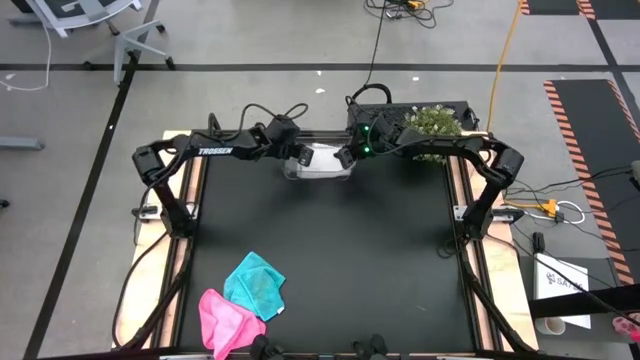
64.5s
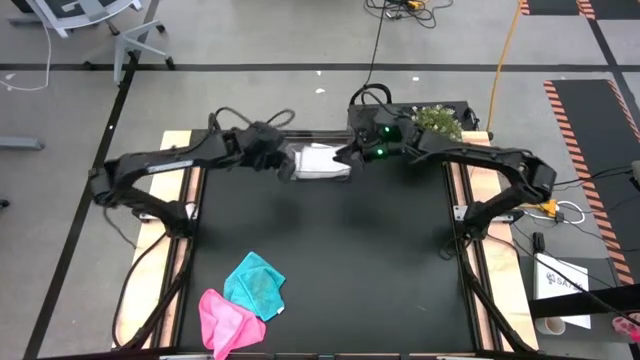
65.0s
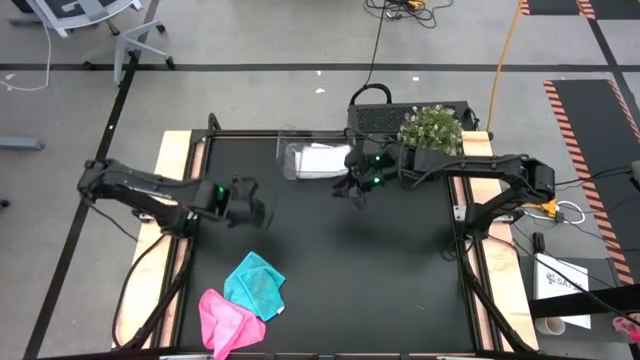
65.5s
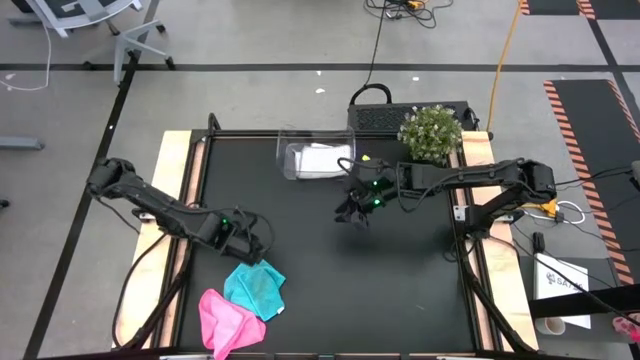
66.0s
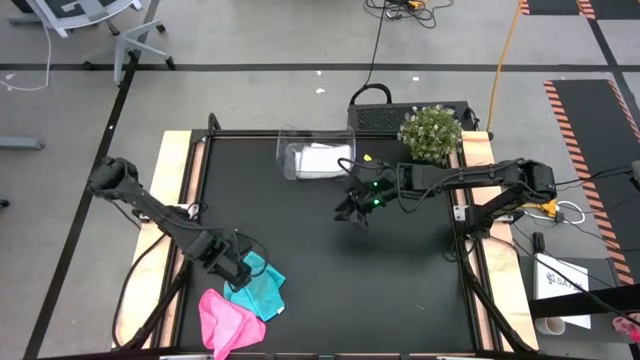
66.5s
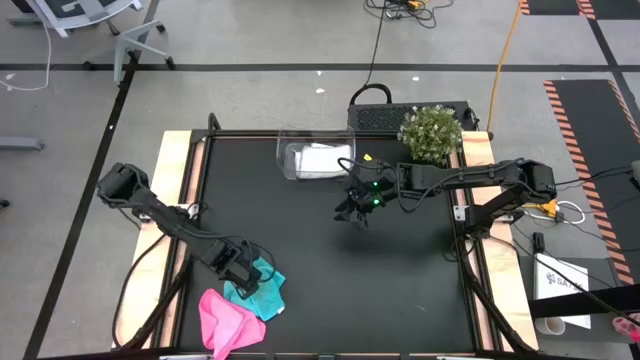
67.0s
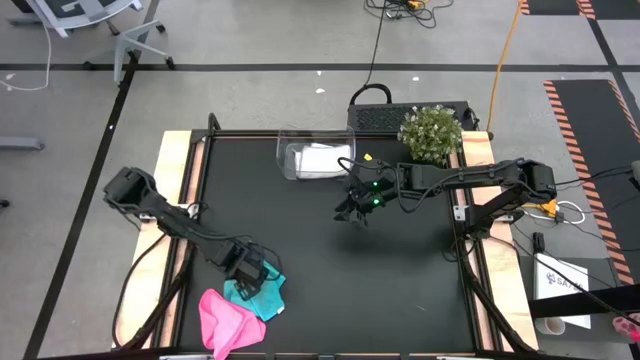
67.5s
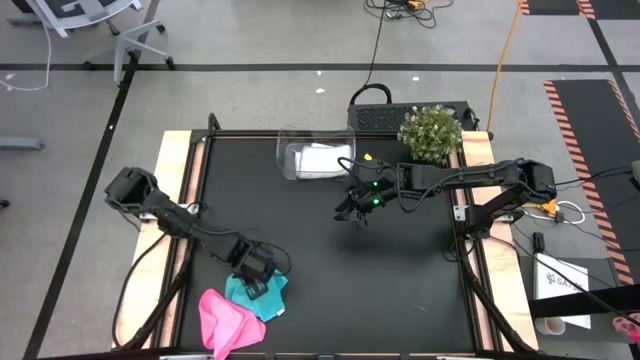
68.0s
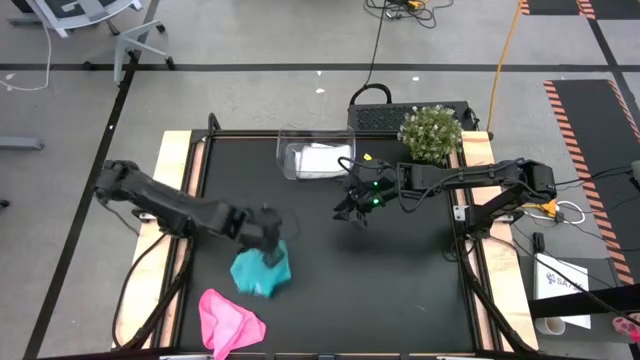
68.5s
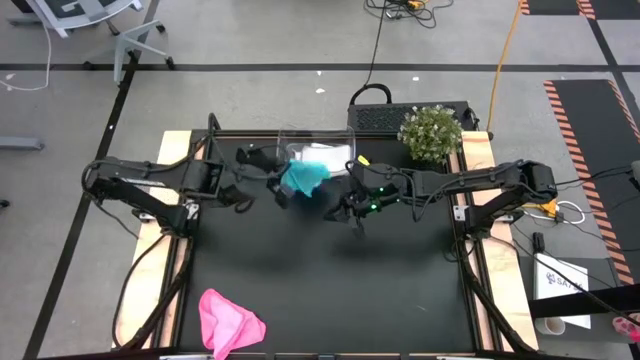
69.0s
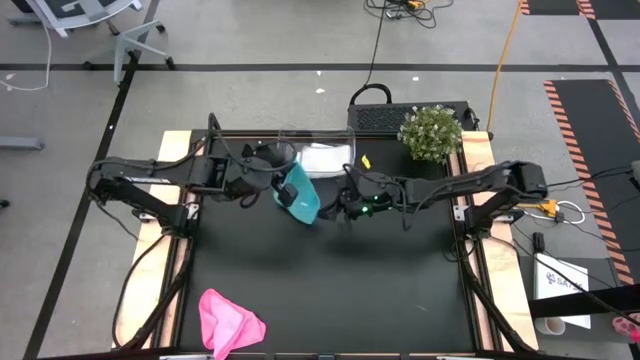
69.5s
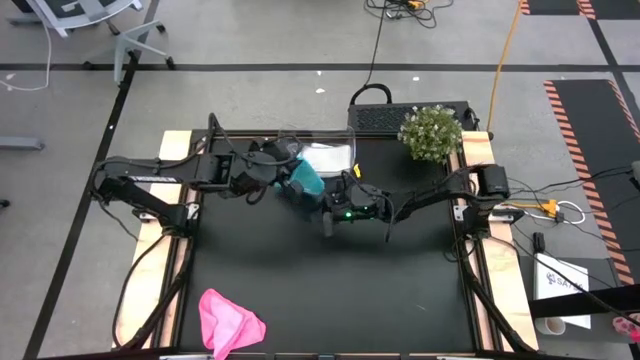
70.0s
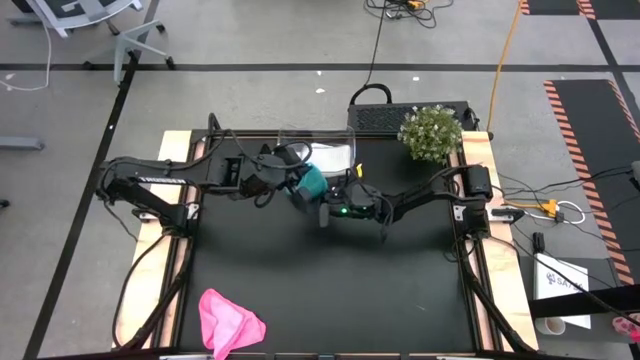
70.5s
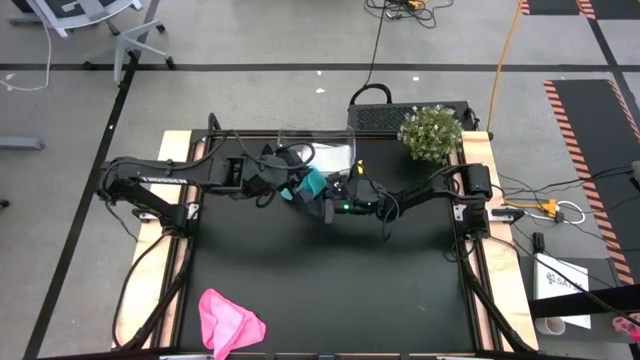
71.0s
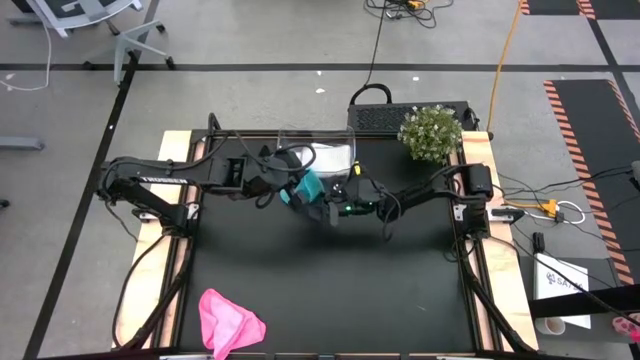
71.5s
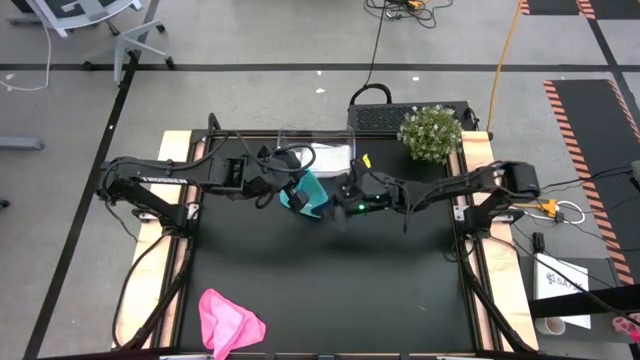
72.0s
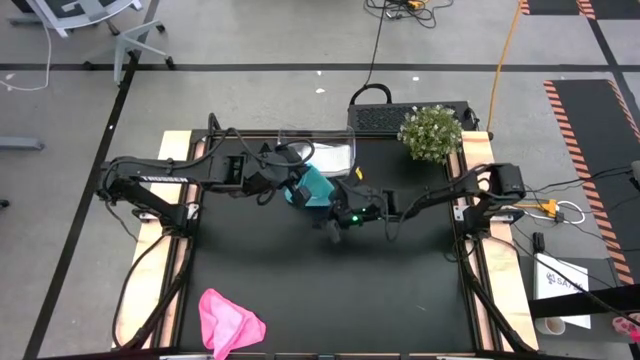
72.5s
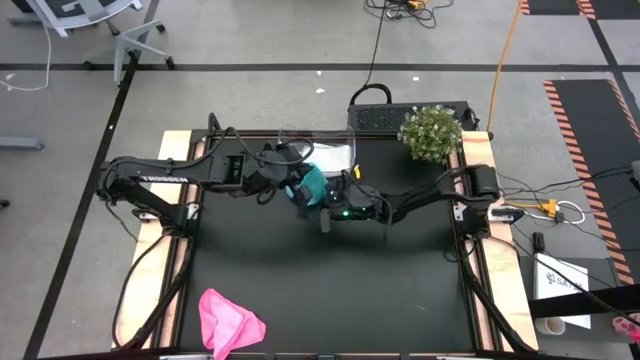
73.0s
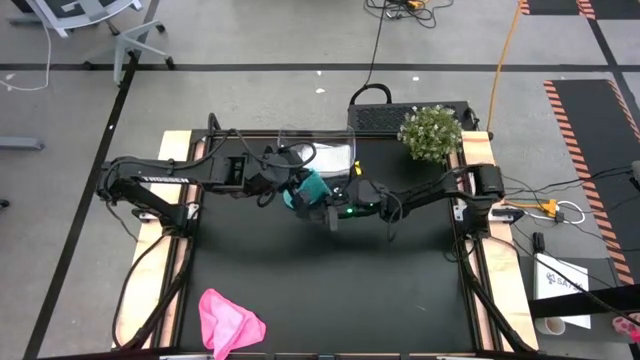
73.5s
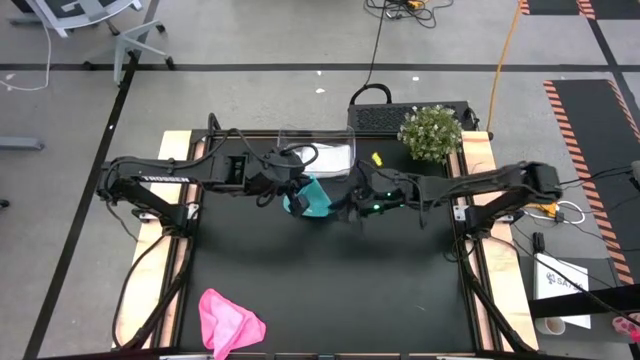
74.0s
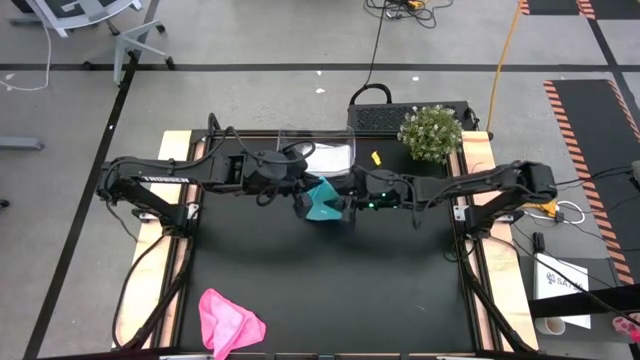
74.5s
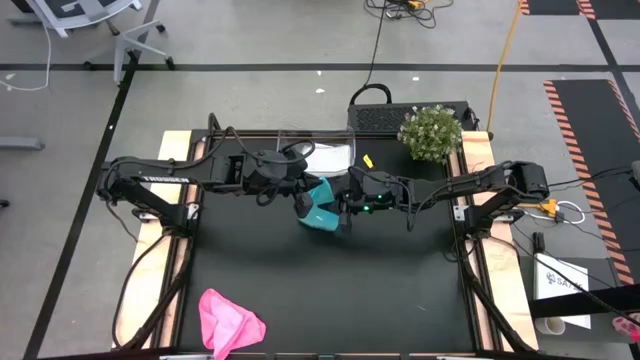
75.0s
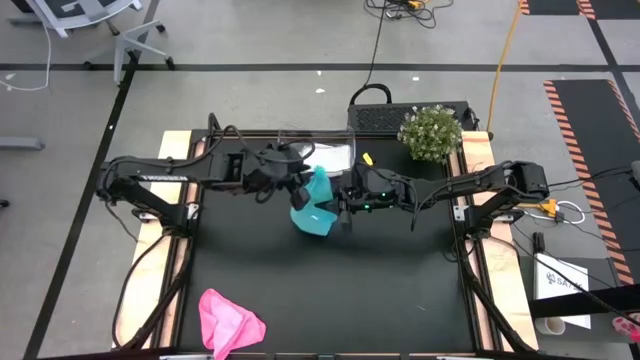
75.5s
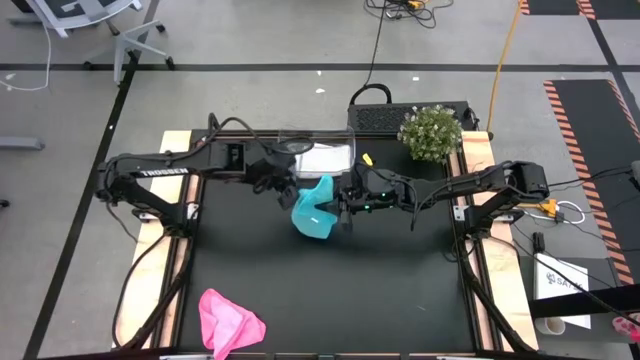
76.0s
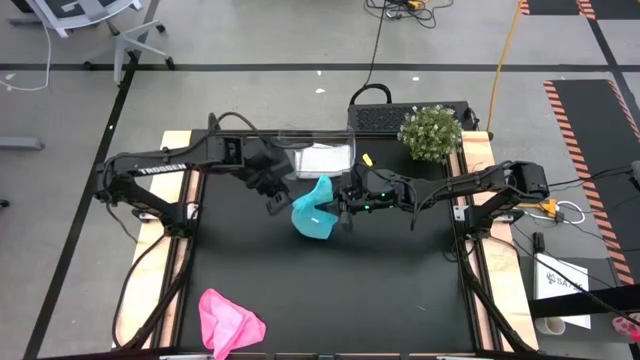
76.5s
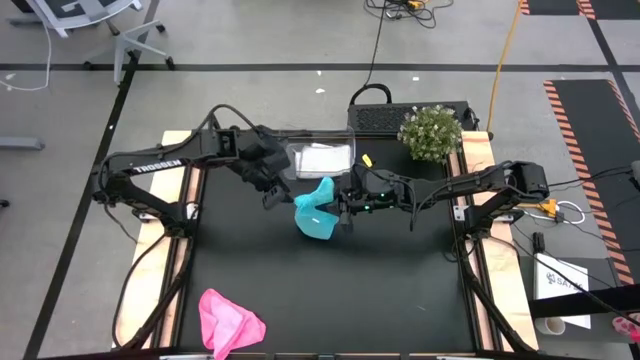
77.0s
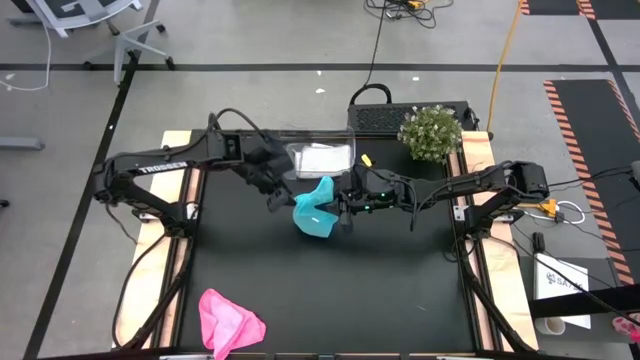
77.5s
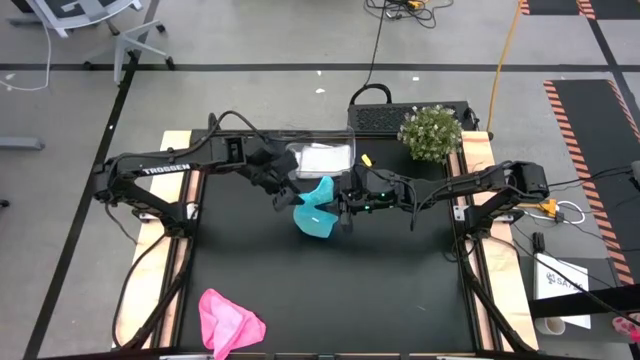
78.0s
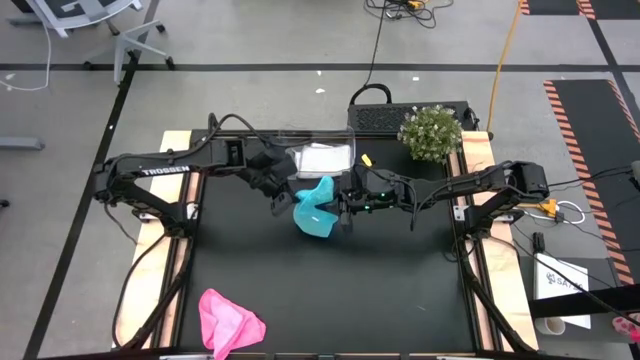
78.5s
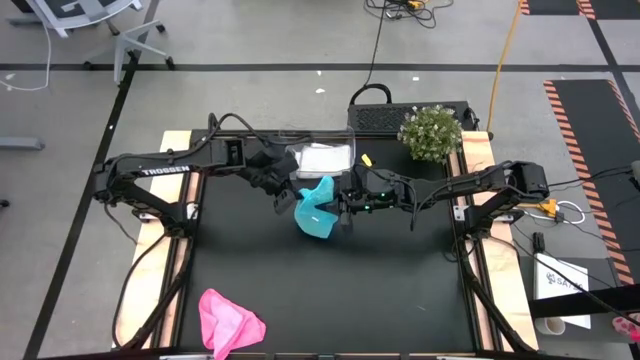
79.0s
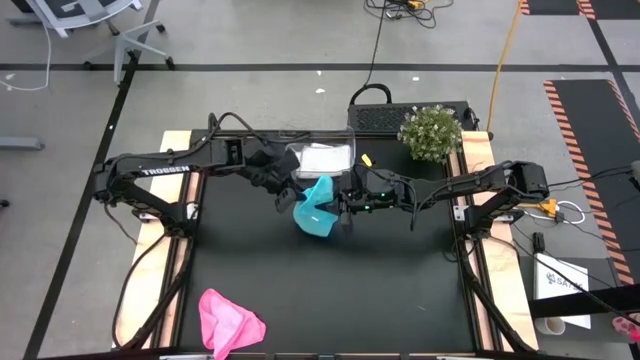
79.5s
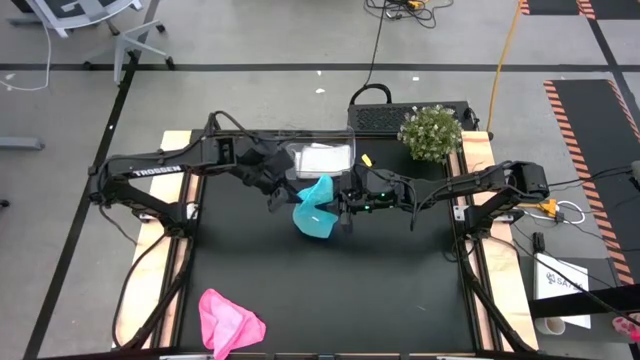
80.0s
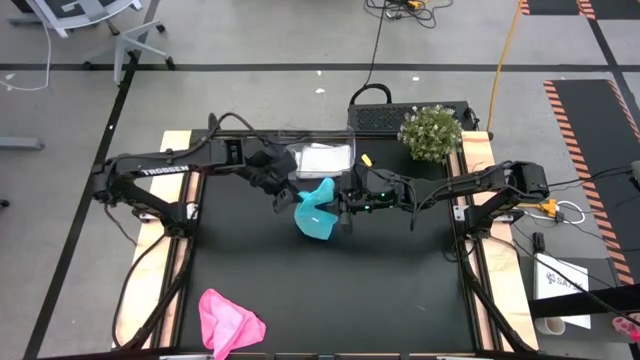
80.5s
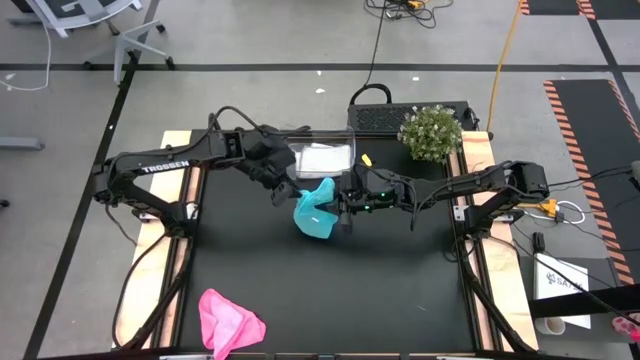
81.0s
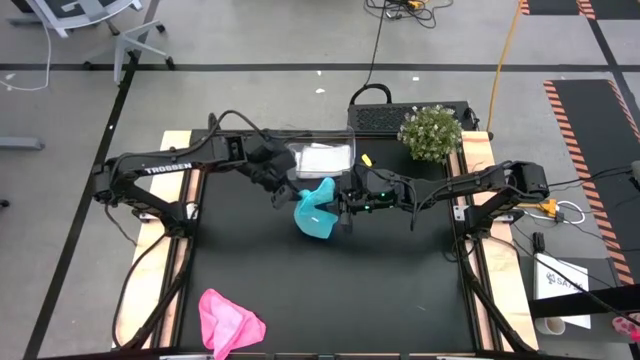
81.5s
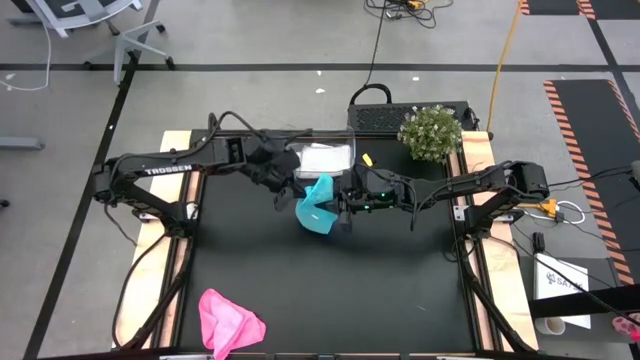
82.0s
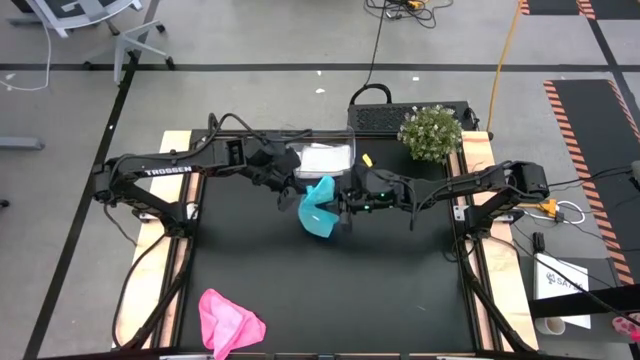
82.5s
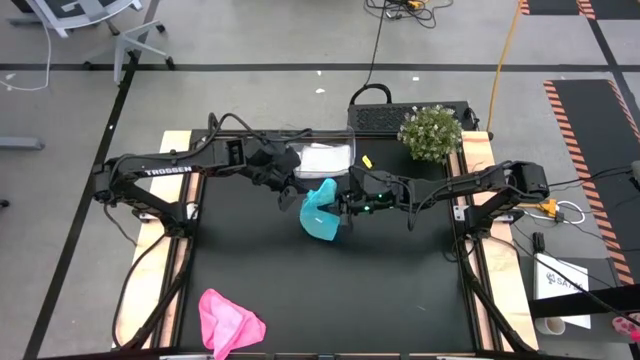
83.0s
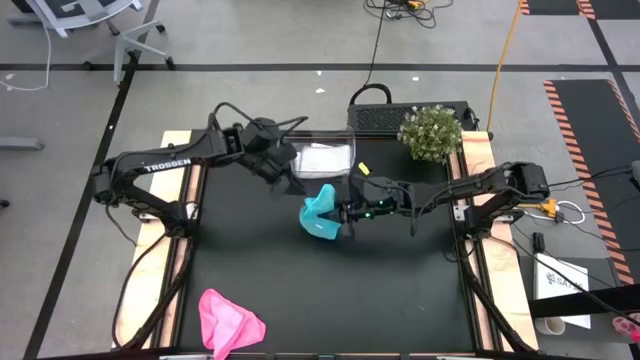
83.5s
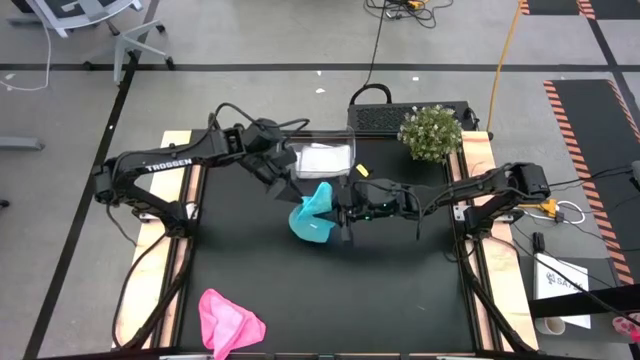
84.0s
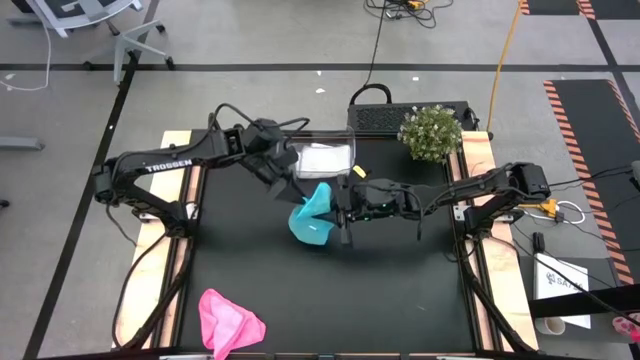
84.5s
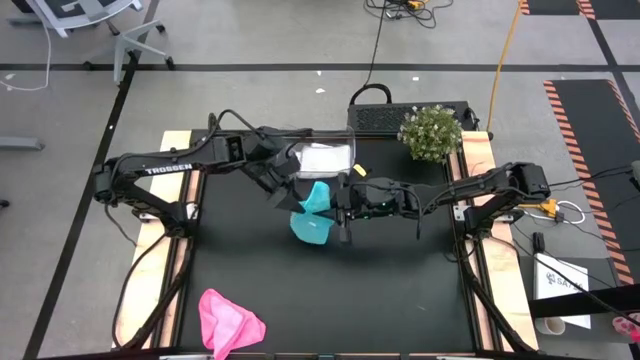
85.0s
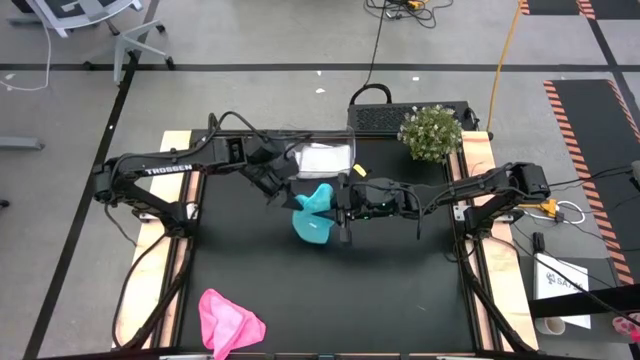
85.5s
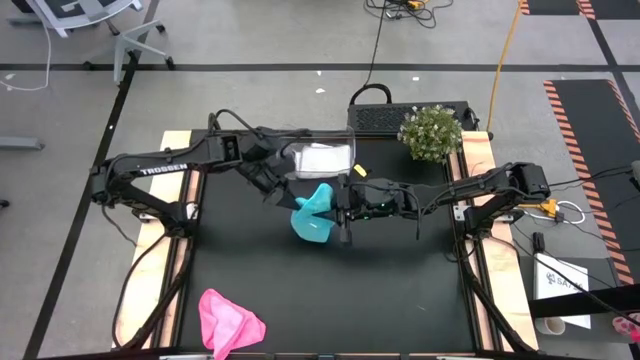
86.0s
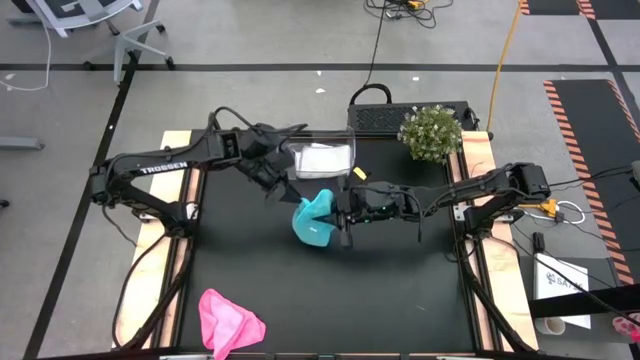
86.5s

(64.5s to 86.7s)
Task: Fold microfiber towels
Fold the blue microfiber towel
